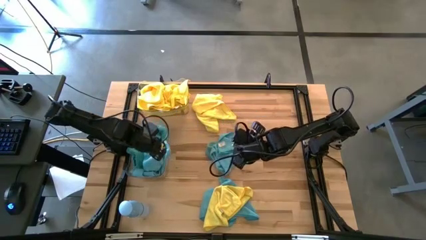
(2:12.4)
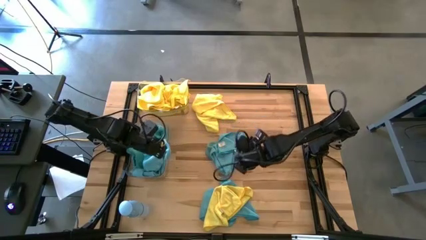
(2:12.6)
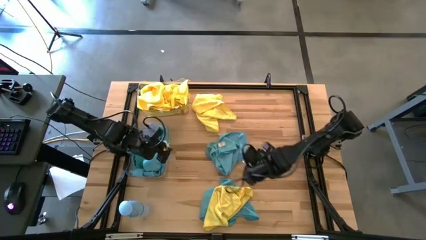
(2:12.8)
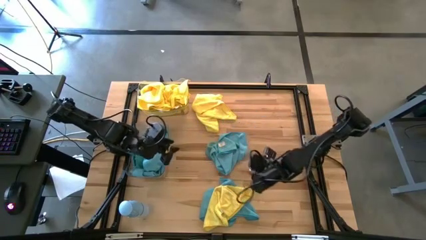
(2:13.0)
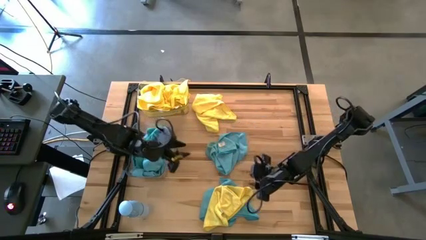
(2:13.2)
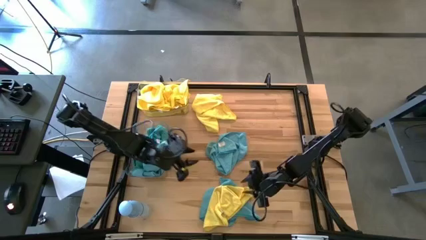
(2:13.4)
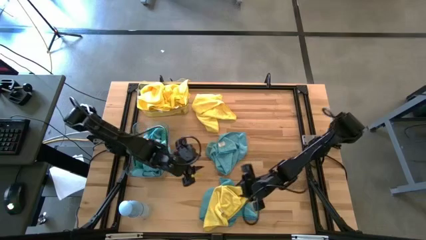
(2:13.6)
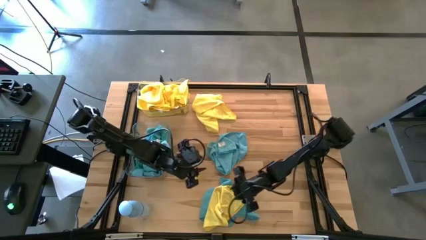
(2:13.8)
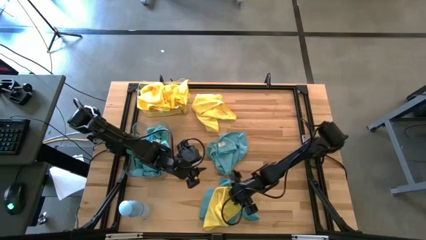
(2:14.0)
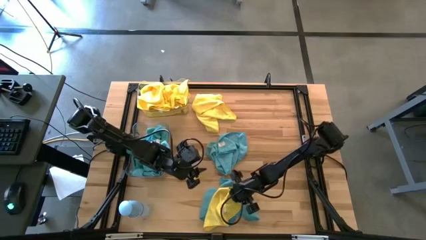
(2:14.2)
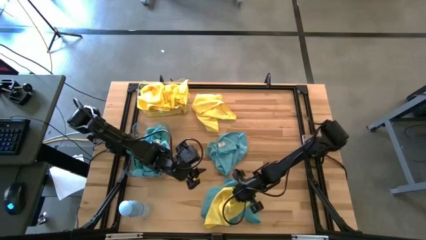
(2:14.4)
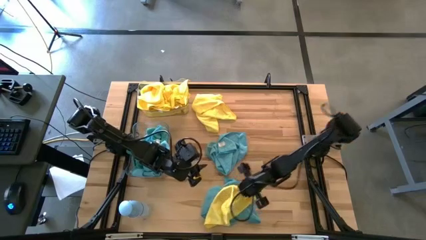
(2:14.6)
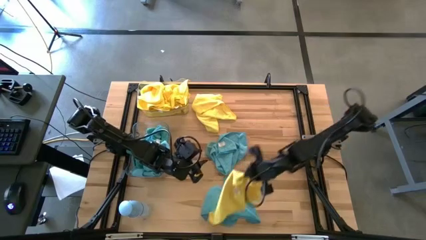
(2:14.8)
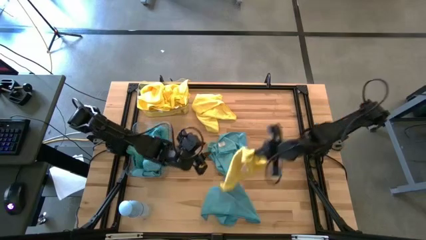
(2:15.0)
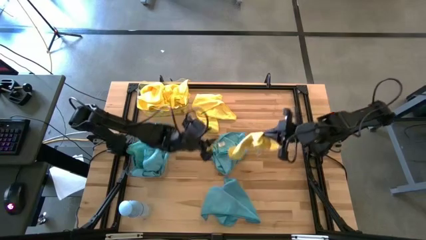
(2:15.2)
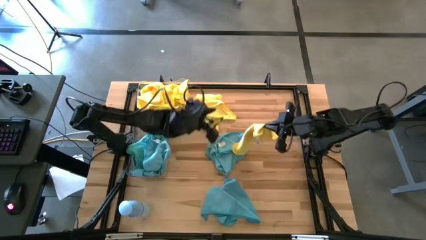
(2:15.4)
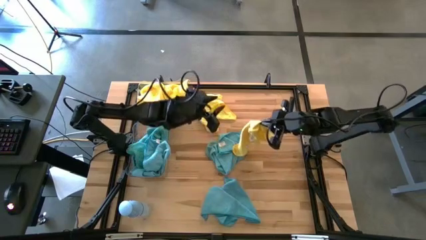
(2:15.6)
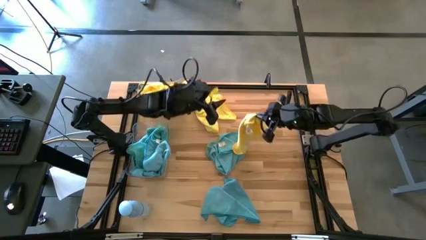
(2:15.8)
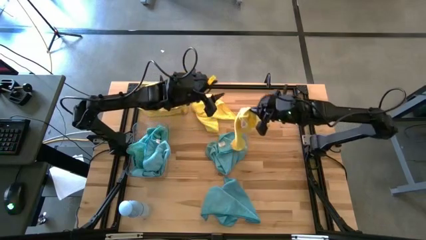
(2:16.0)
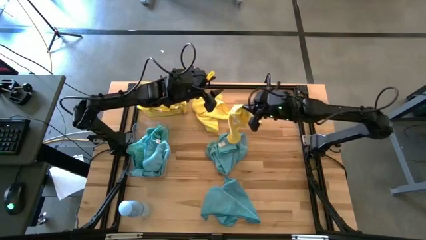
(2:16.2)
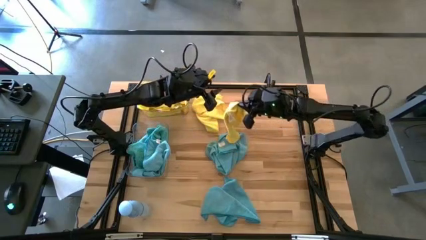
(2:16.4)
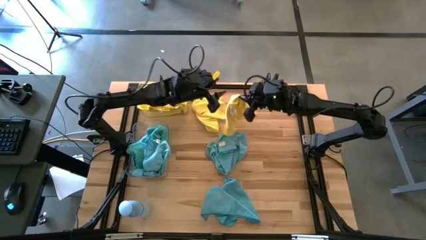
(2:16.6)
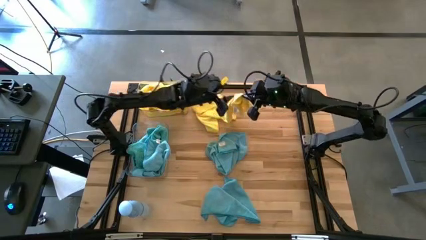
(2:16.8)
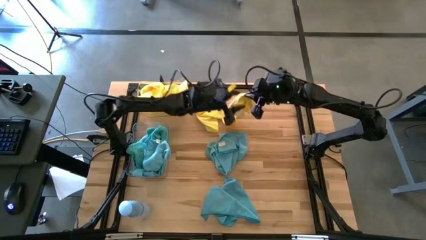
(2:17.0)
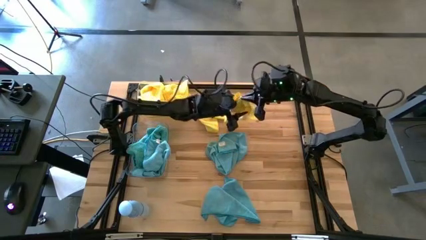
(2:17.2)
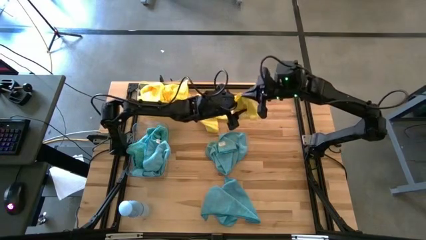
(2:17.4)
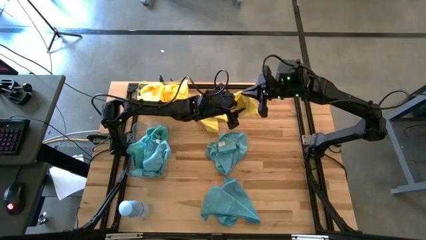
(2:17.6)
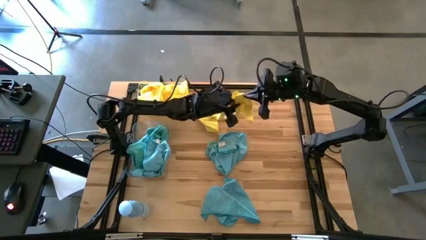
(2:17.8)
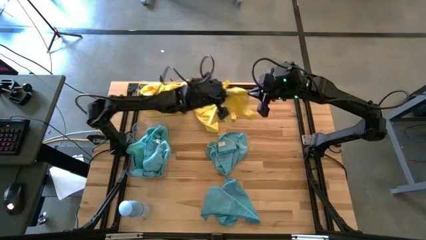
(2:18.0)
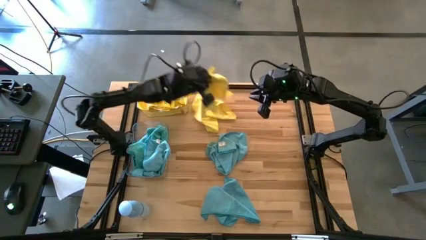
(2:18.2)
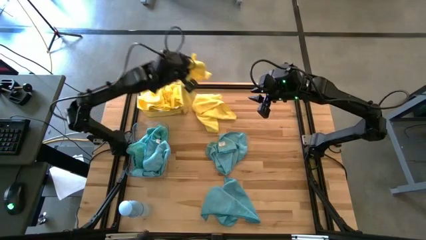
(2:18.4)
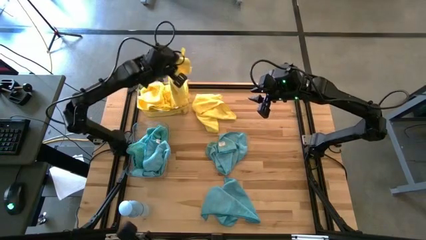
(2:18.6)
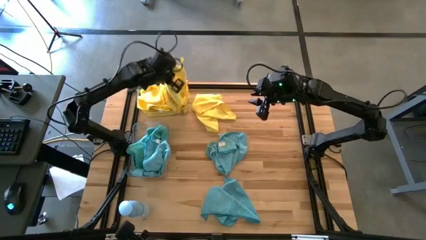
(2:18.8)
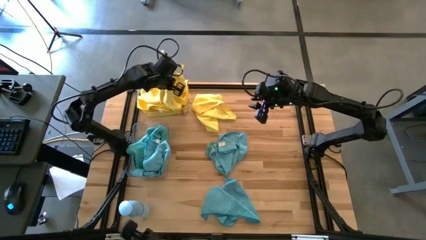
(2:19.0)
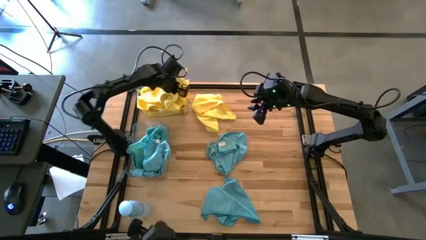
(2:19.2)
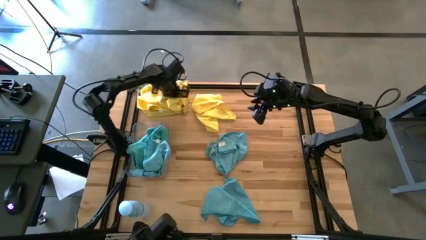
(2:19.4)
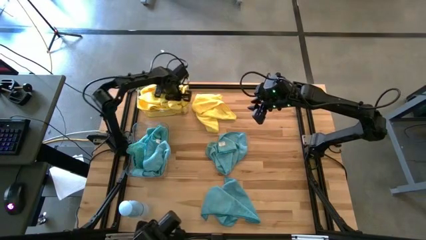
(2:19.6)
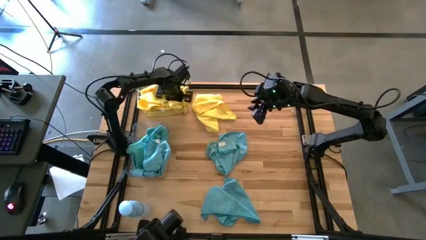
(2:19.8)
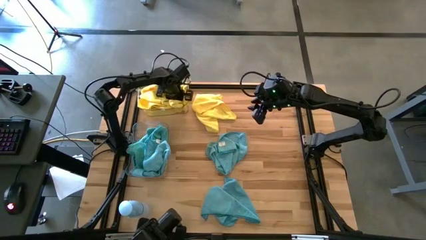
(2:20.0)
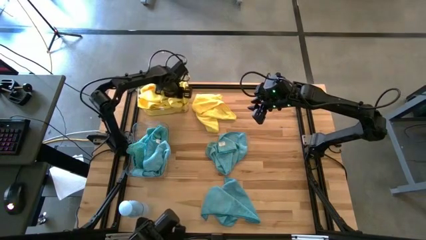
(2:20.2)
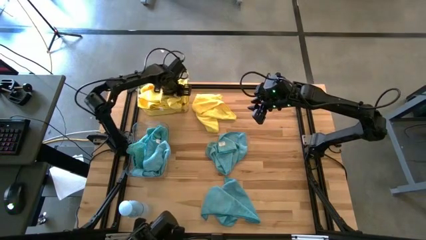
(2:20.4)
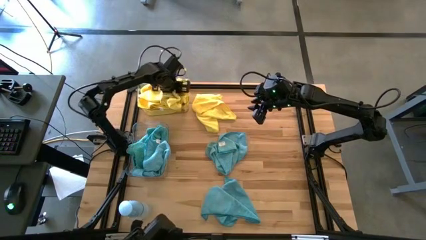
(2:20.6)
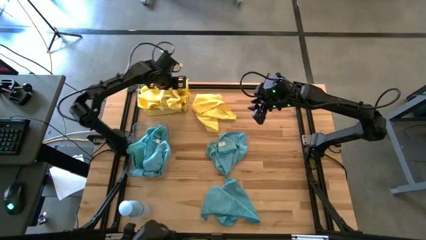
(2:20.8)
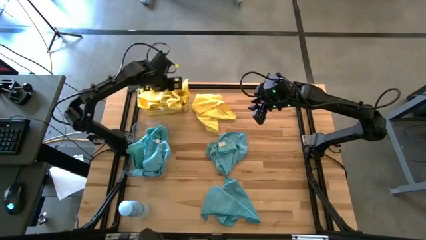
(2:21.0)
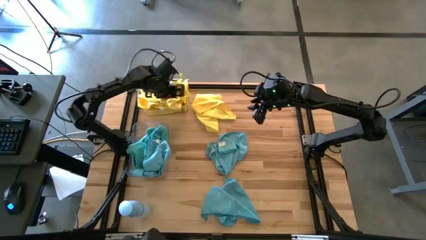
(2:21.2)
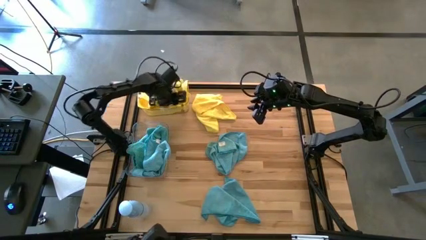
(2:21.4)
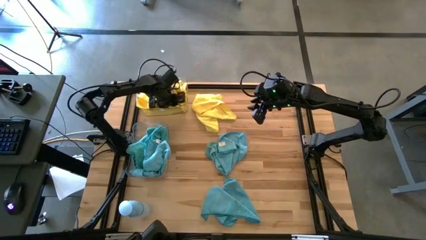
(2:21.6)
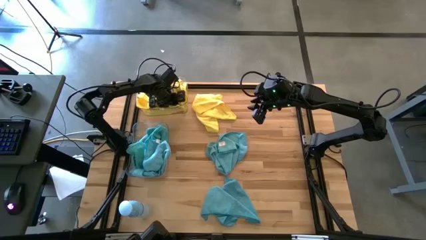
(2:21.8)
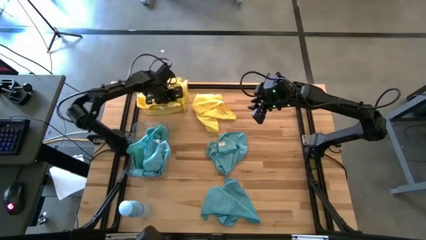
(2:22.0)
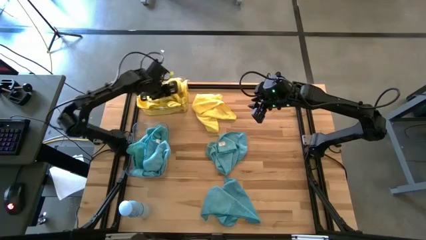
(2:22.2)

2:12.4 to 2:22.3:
Task: Sort microfiber towel by color & place in baskets
Put the yellow microfiber cloth into the top transparent bin

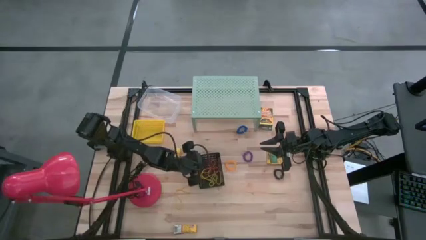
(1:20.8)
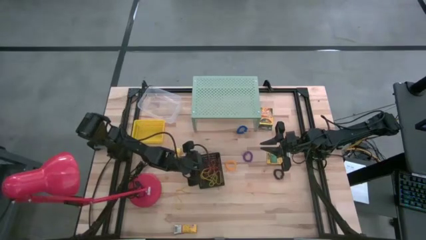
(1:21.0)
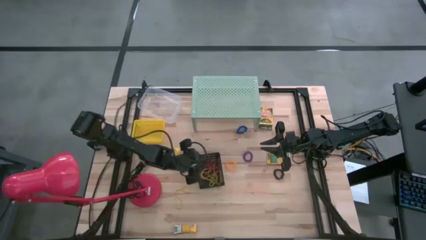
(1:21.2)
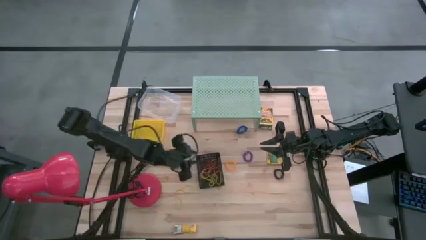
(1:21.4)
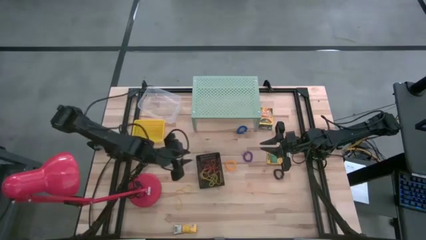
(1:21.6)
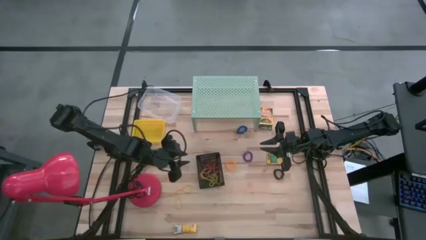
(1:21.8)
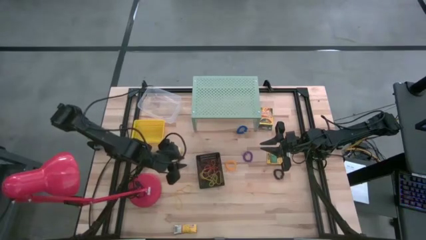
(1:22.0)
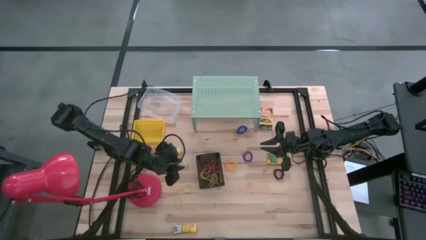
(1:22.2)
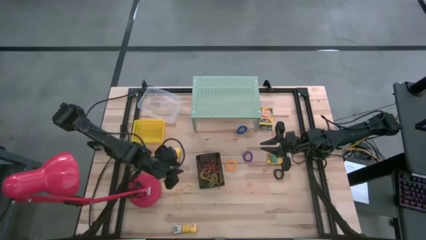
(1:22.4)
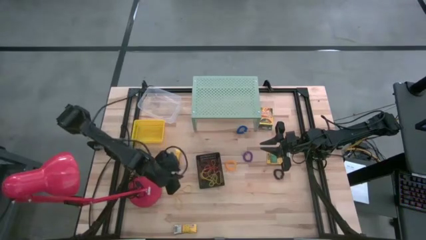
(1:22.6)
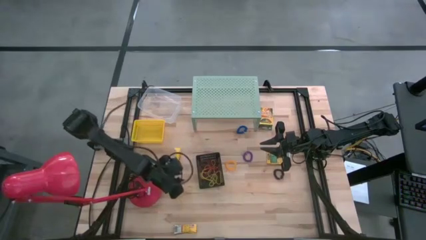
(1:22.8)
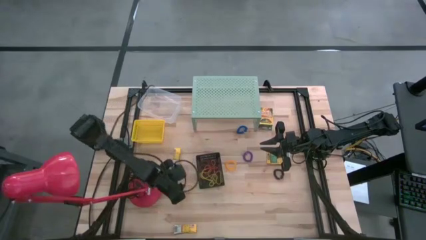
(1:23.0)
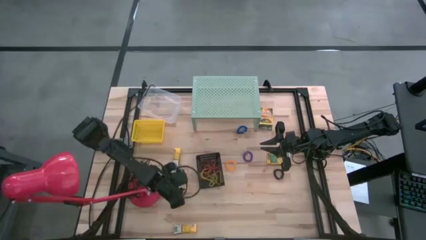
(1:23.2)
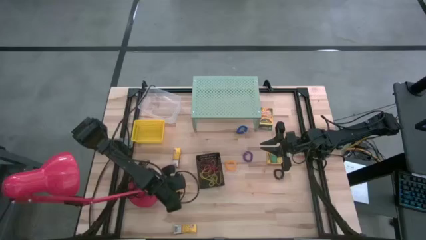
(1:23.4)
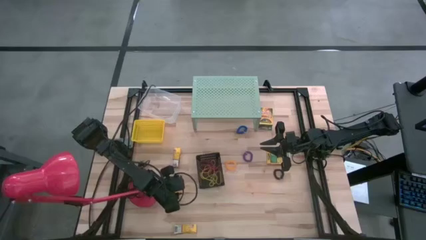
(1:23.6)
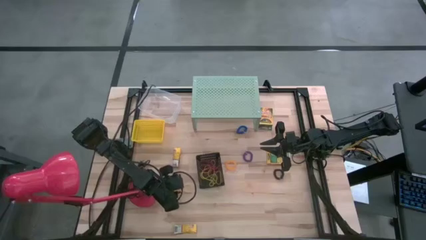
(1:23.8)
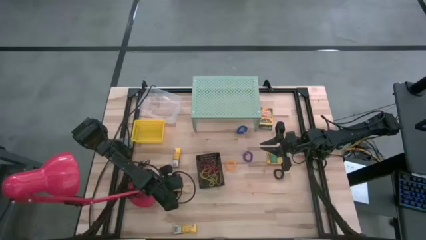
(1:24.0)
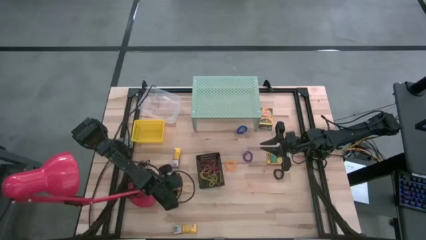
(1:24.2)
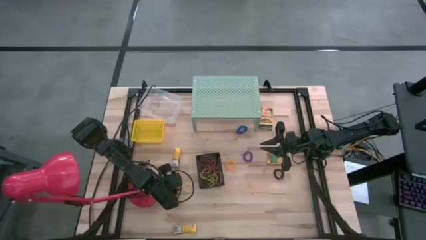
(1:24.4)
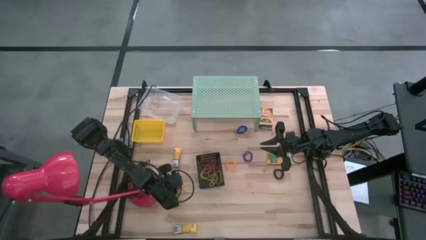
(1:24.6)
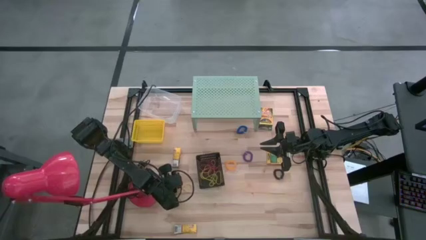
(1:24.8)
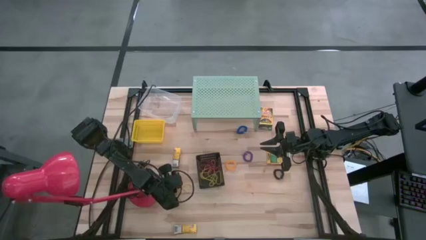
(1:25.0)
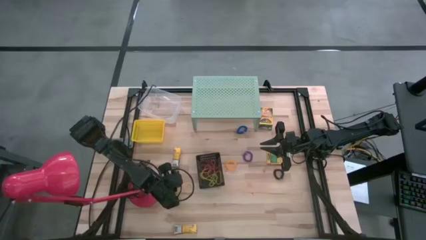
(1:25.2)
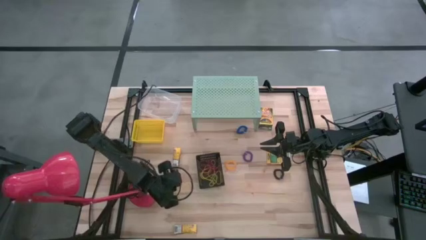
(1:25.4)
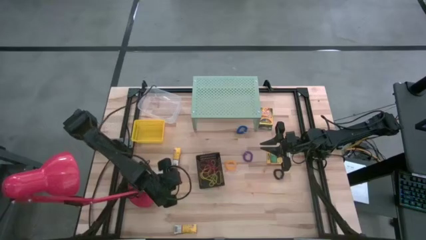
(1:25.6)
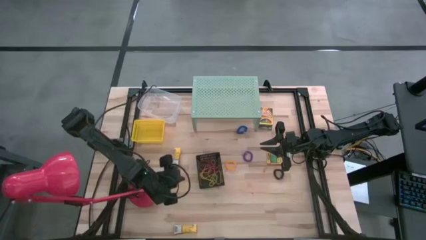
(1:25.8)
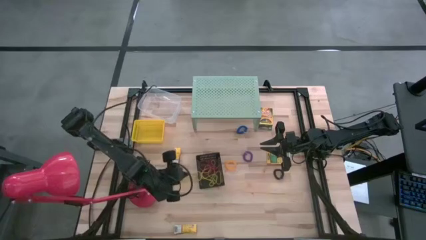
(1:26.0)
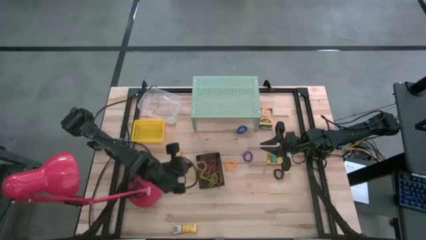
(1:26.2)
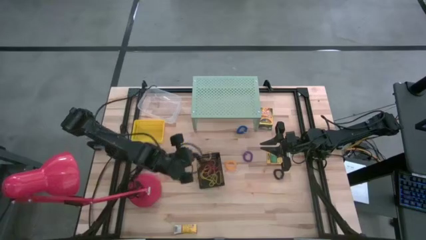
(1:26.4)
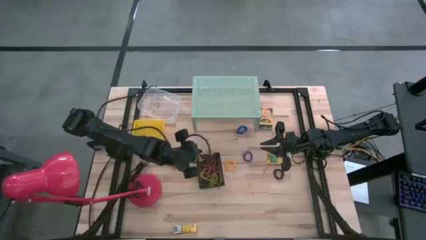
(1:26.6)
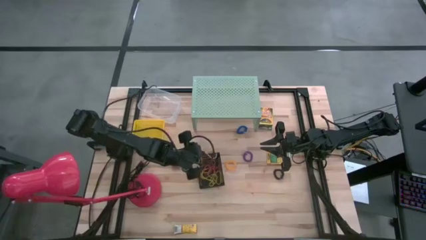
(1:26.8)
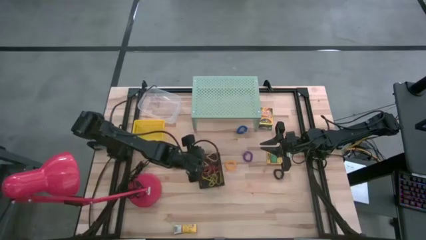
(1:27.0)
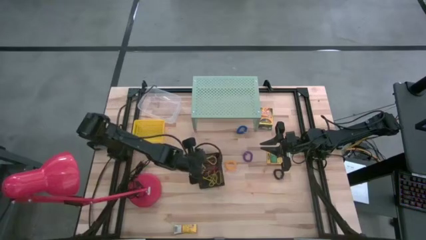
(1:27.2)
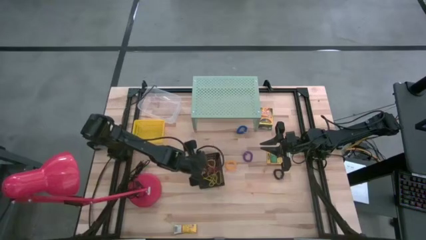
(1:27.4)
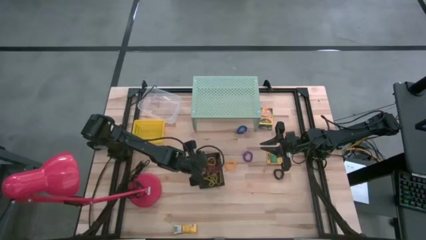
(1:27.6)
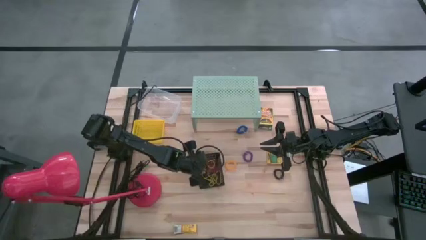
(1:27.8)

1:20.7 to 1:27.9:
Task: Pick & Place Office Desk Supplies
Put the yellow rubber band into the black bin
